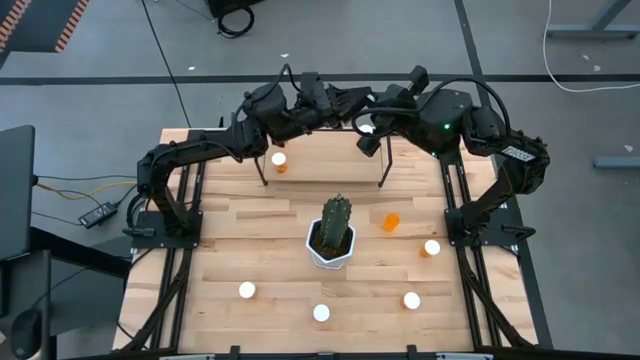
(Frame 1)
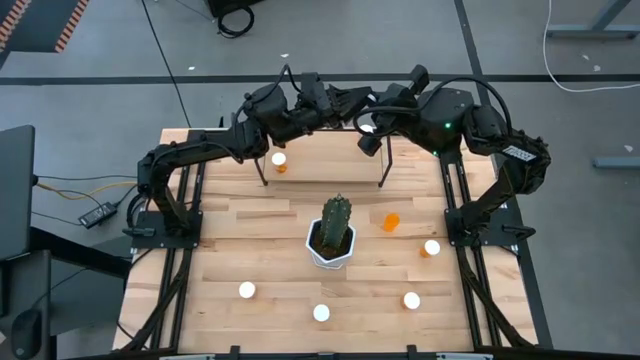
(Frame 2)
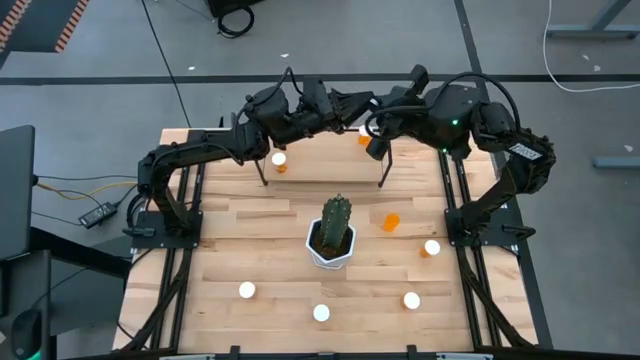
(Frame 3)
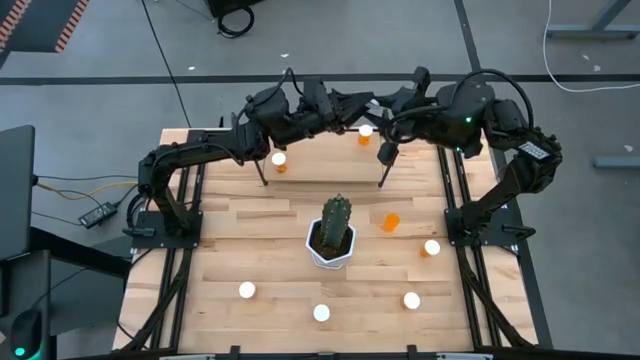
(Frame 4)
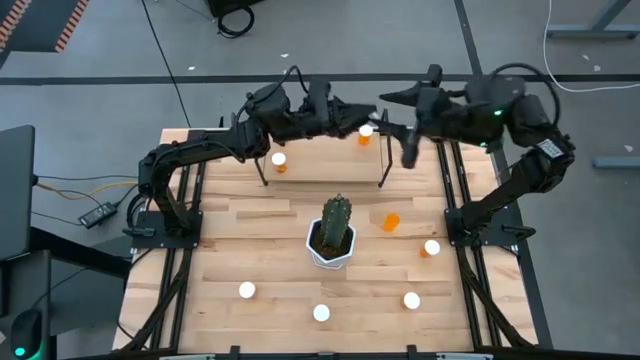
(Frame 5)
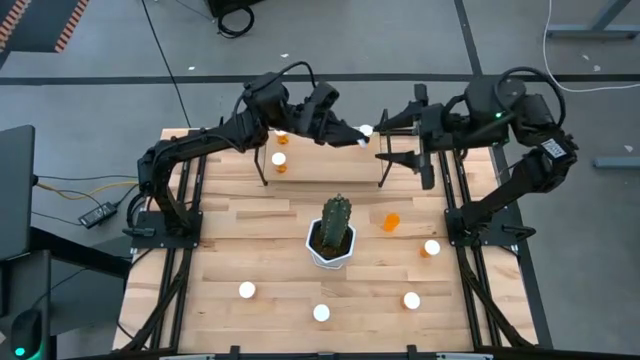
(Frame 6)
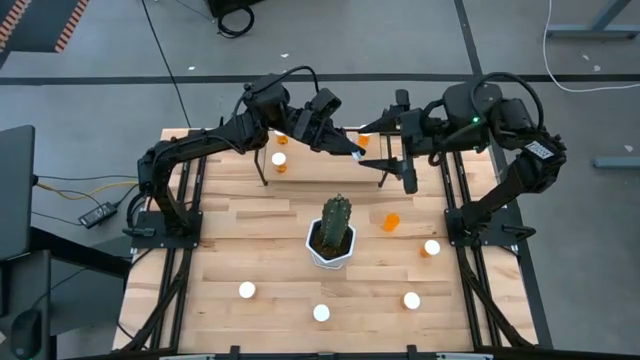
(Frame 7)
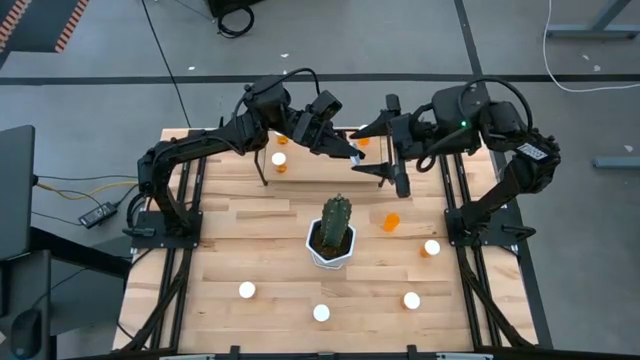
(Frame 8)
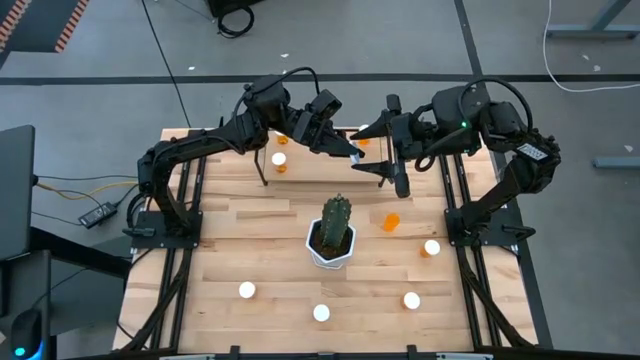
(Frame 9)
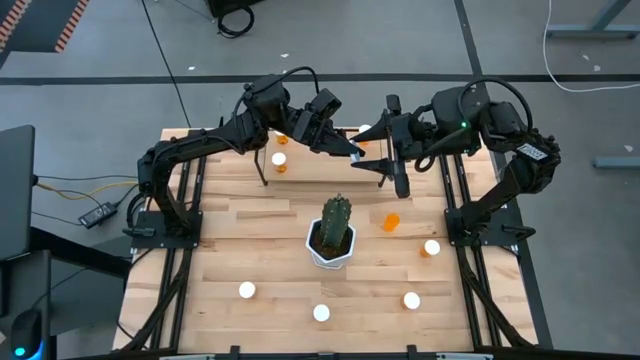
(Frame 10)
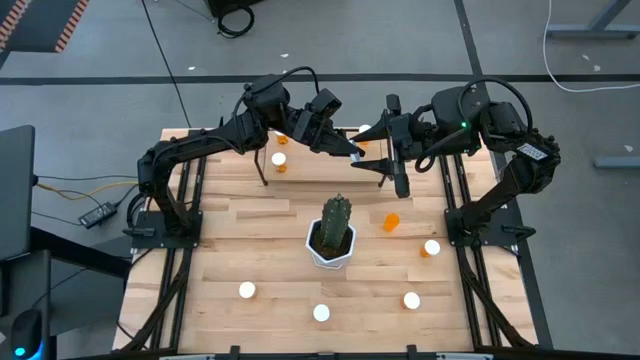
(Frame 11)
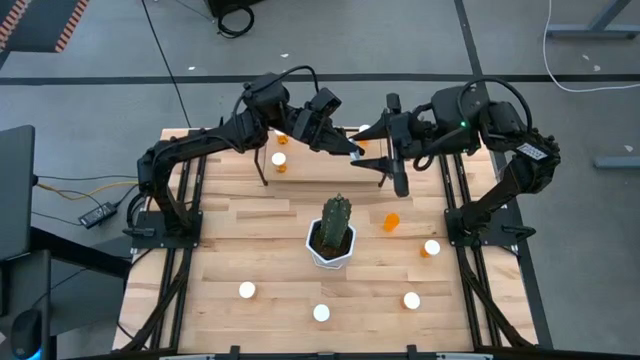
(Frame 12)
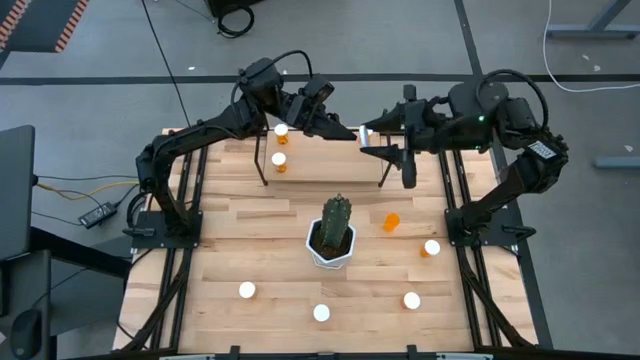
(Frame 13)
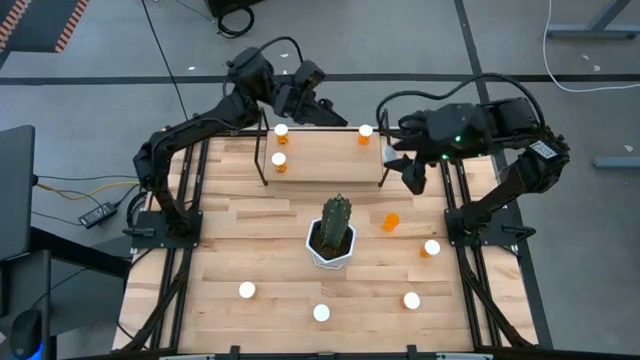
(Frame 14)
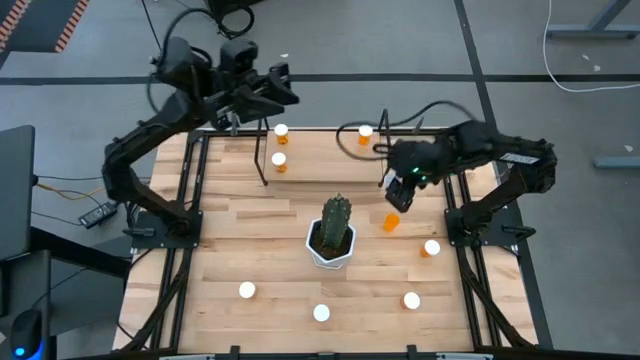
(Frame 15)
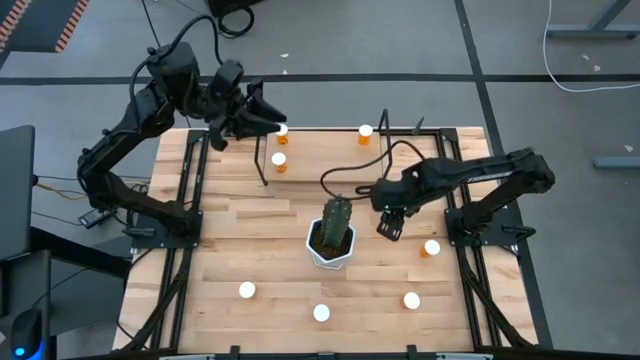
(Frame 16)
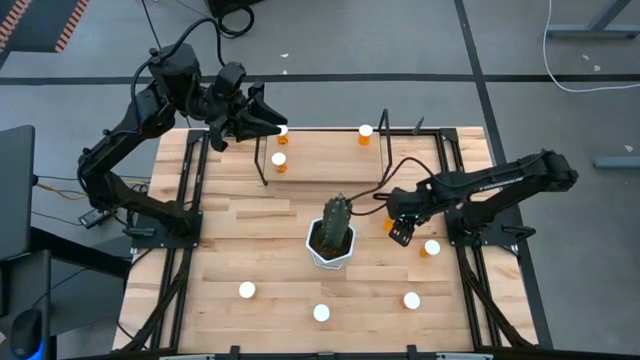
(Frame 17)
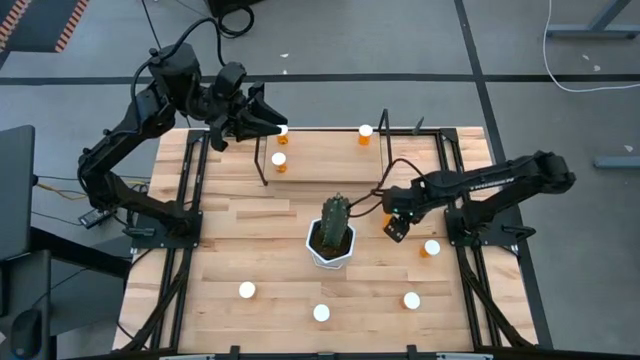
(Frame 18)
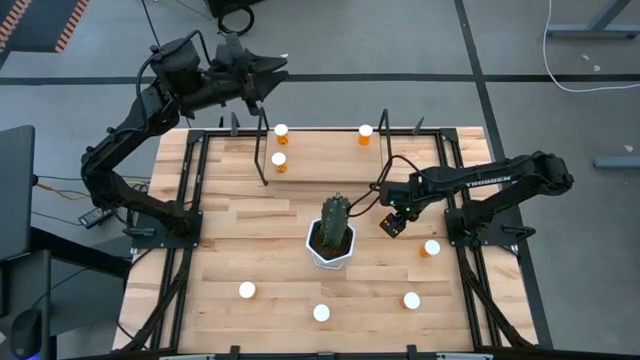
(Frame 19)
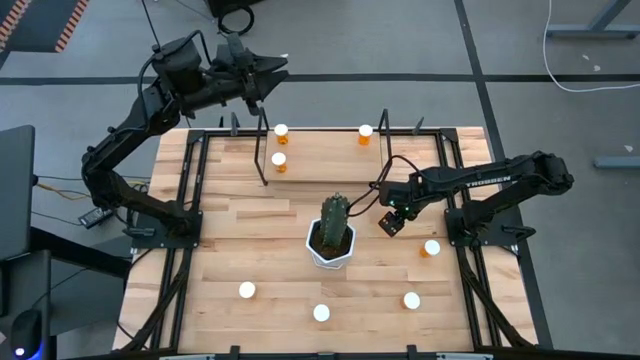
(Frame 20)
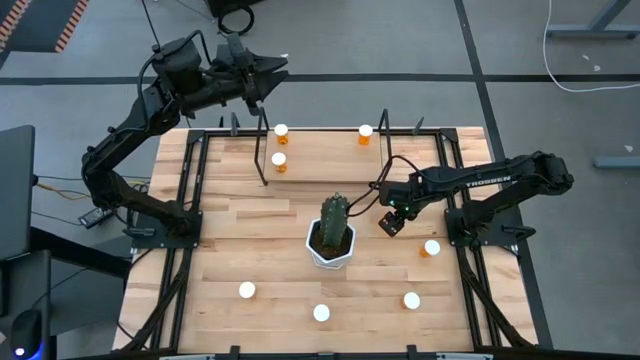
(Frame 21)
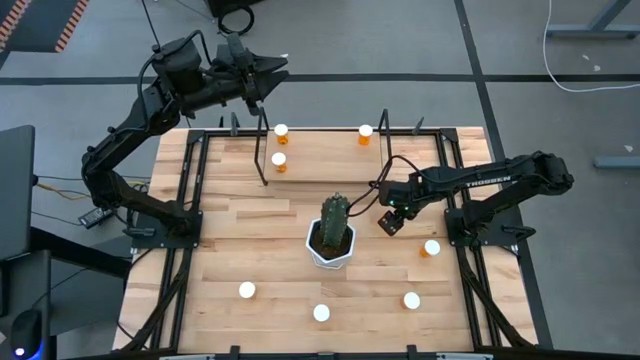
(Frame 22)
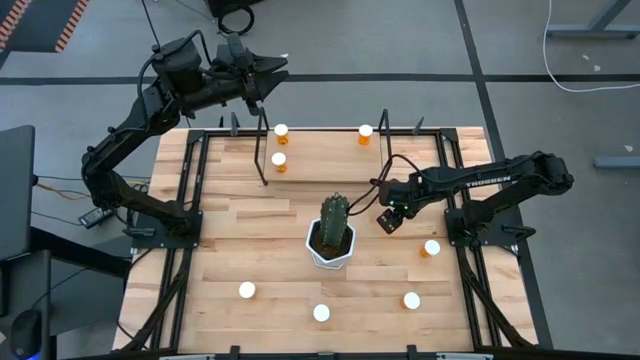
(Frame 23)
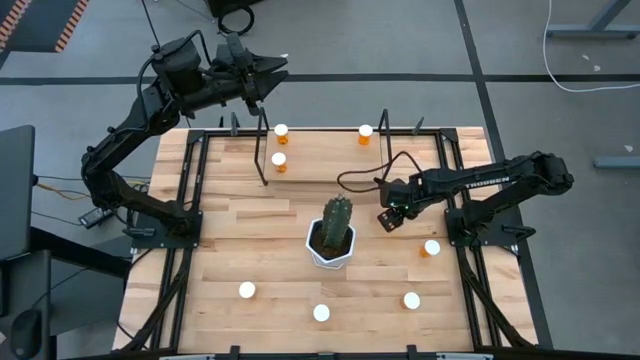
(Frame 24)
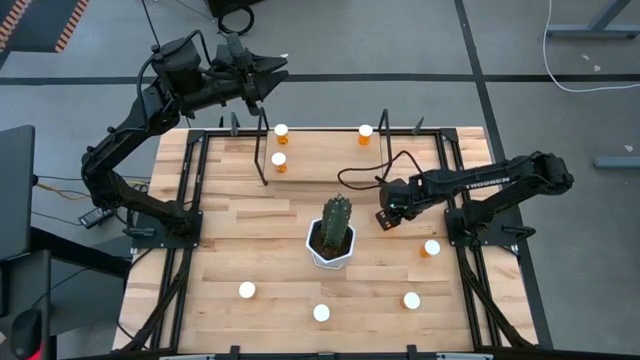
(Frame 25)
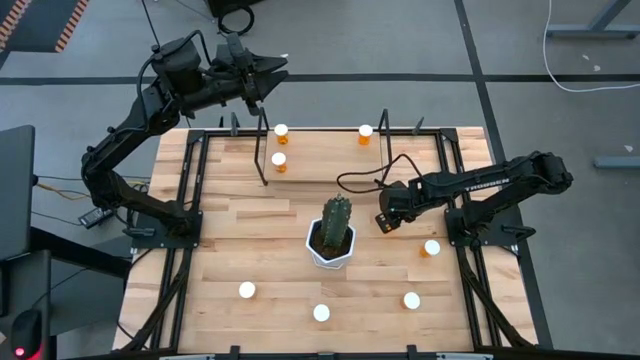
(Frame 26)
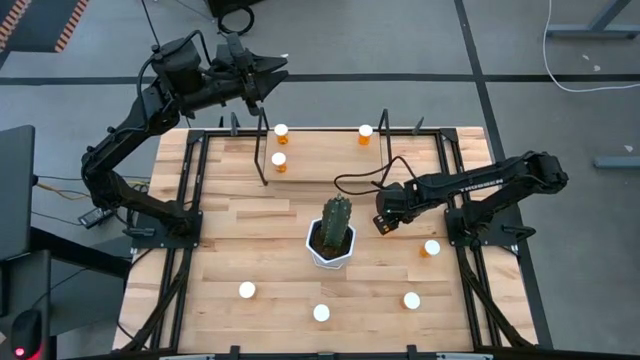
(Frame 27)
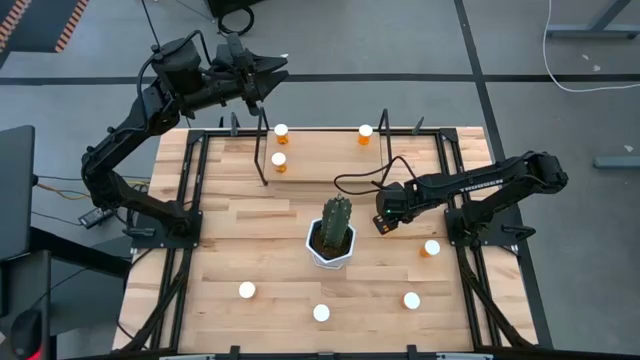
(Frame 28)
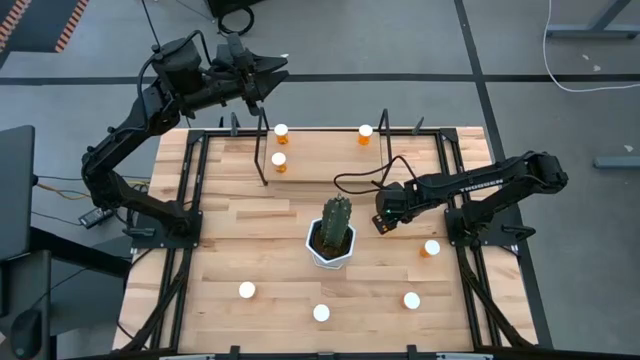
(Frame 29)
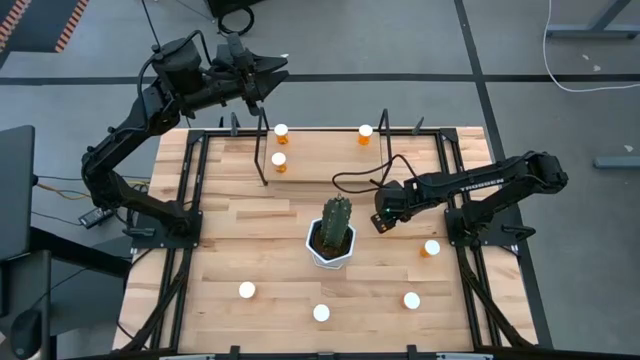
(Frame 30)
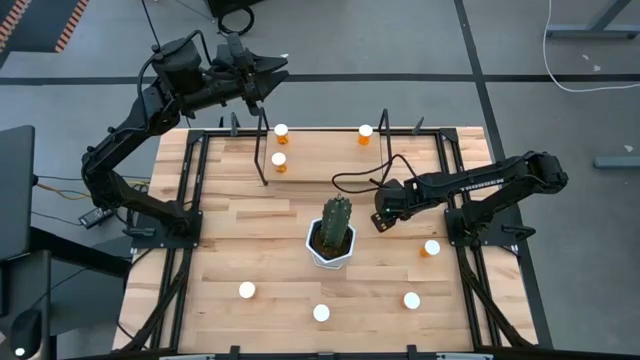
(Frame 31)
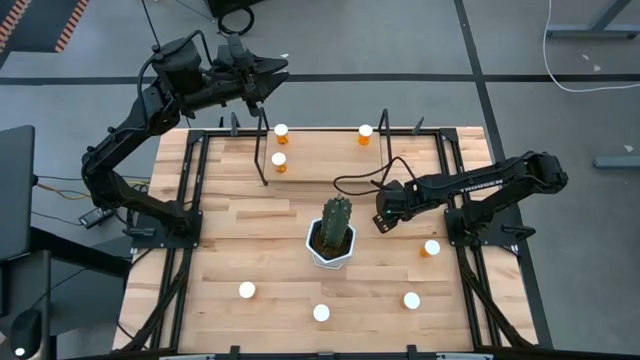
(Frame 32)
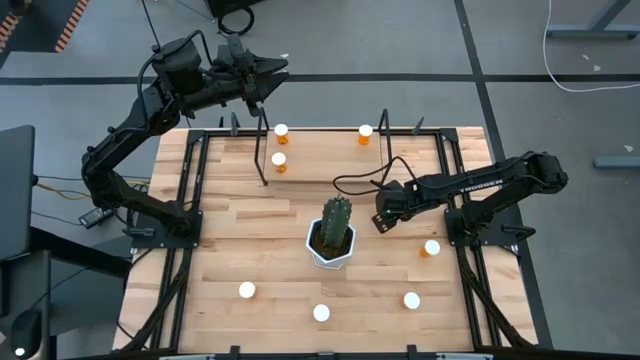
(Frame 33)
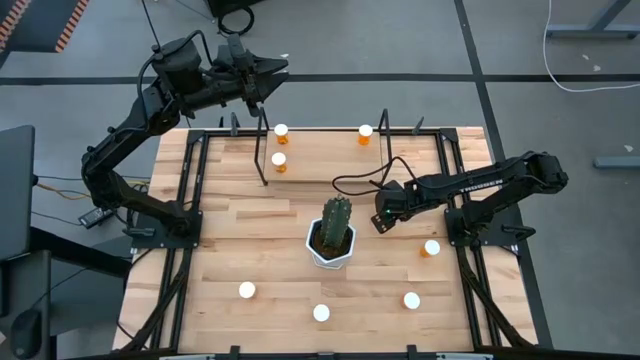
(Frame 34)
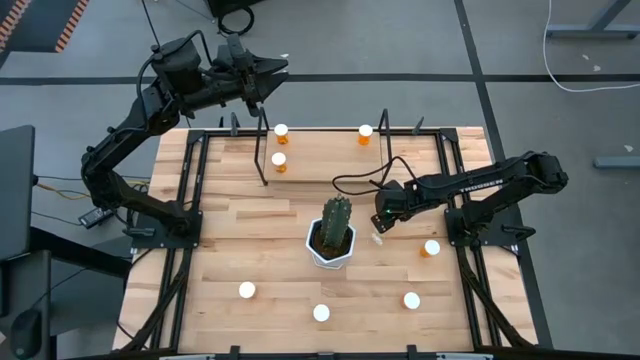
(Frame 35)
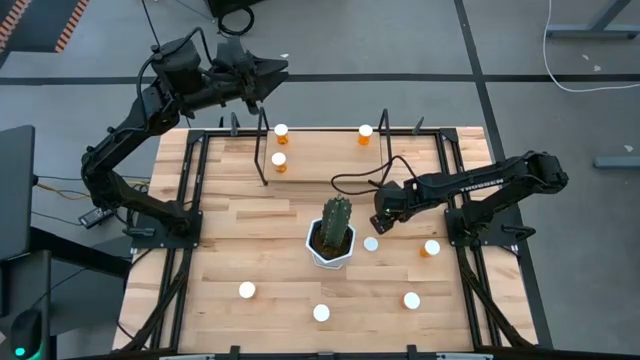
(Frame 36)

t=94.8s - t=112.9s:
Task: Pick and place medicine bottles onto shelf by color
Put the orange medicine bottle on the shelf

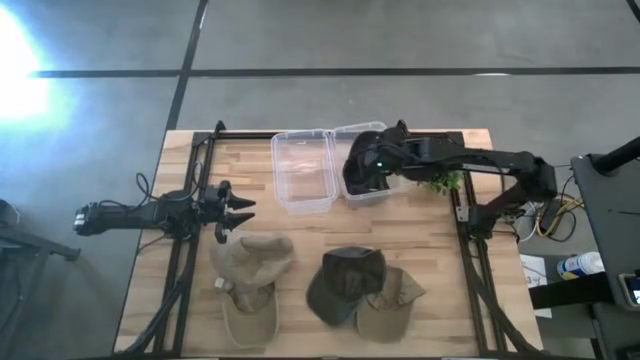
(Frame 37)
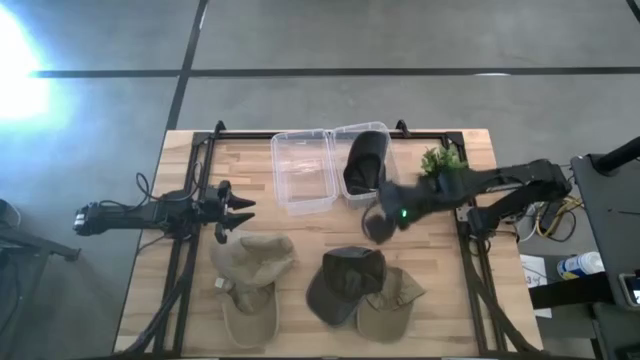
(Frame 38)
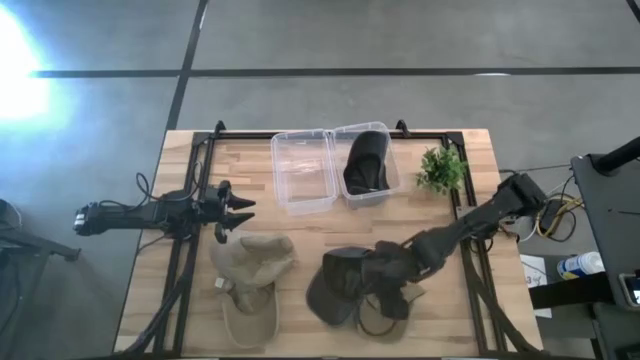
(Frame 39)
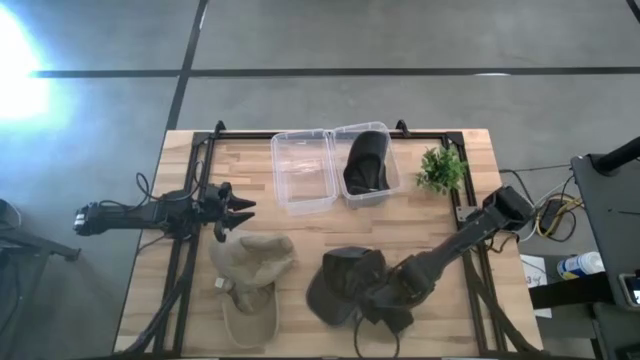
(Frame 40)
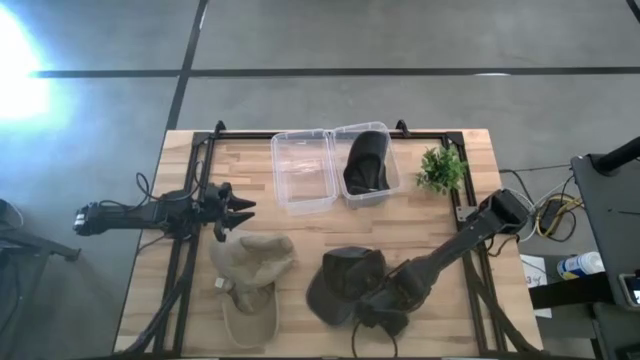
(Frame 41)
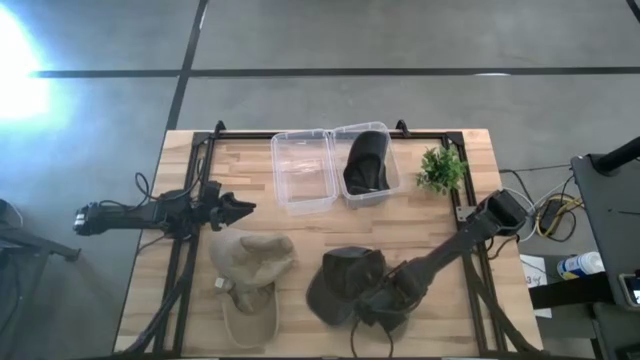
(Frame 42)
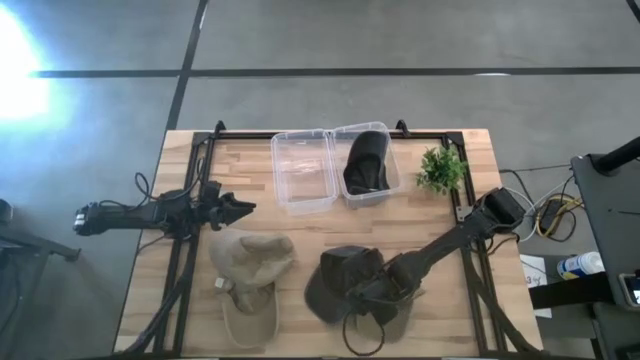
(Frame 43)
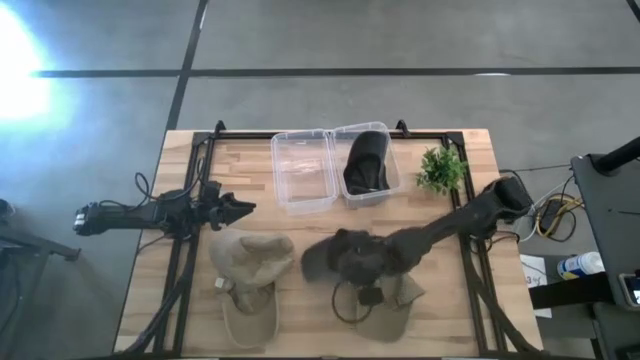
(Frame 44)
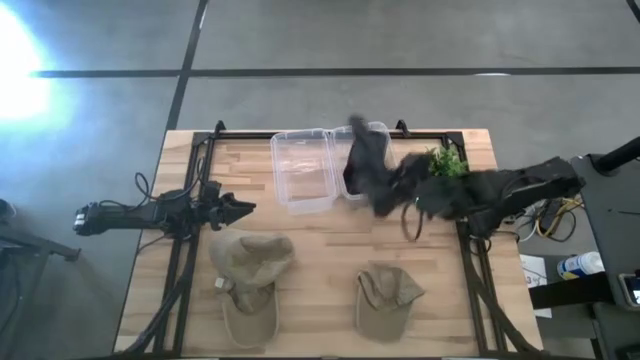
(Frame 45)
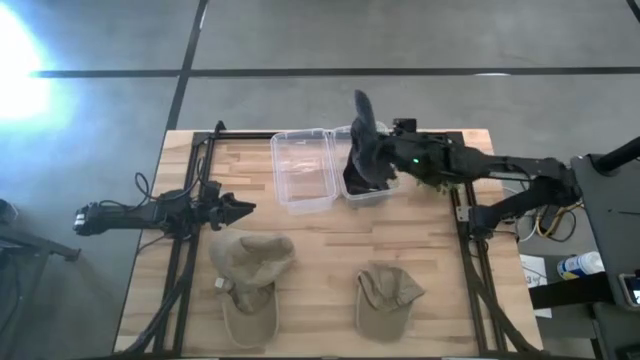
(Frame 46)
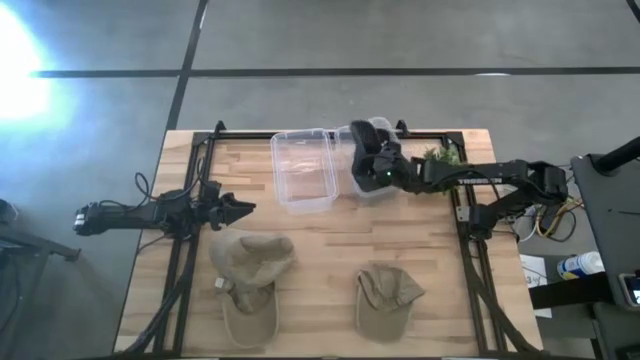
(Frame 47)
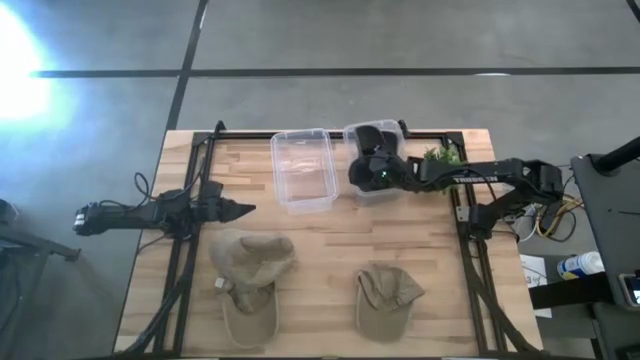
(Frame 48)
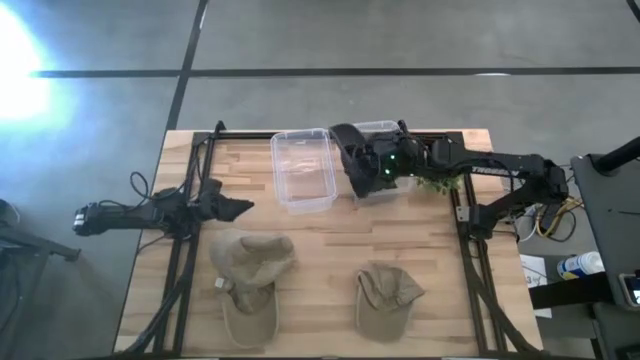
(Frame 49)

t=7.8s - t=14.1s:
Task: Pick & Place hat
Put the blue cap into the right transparent bin
